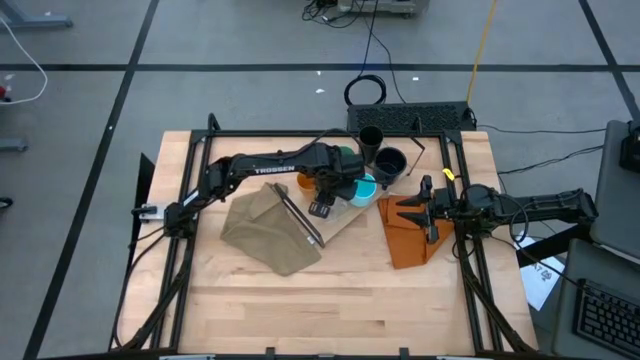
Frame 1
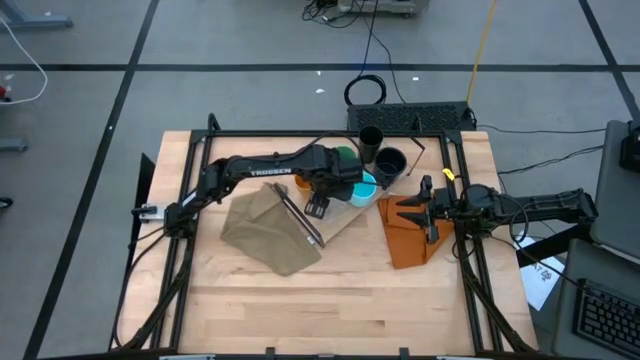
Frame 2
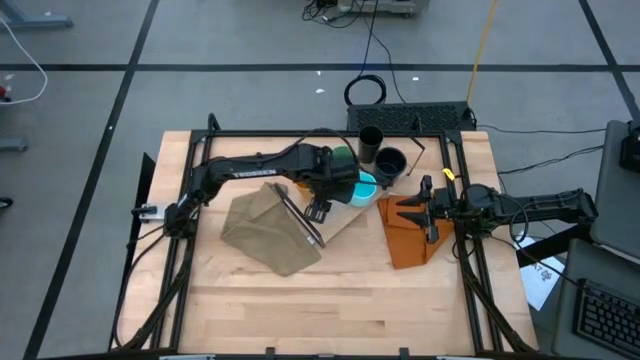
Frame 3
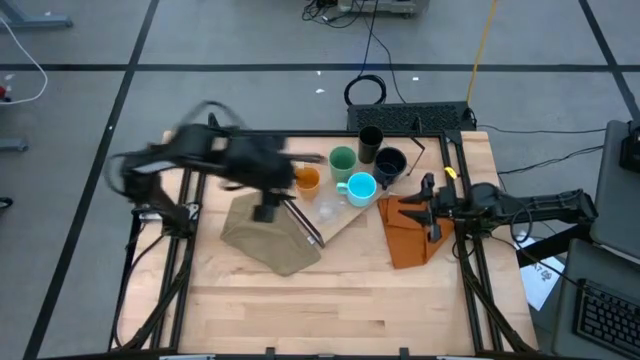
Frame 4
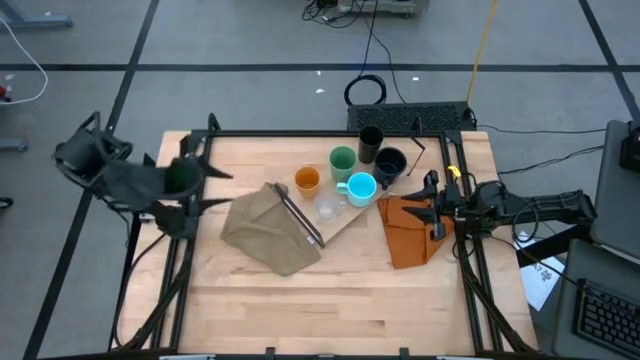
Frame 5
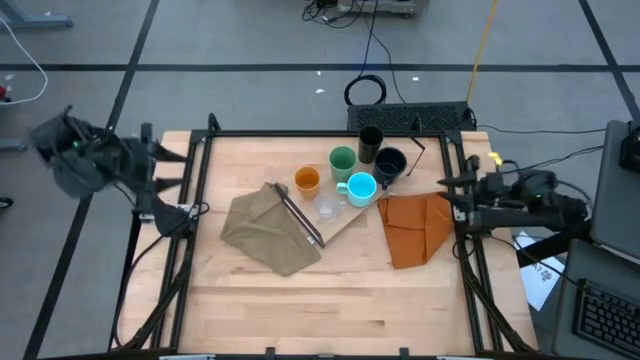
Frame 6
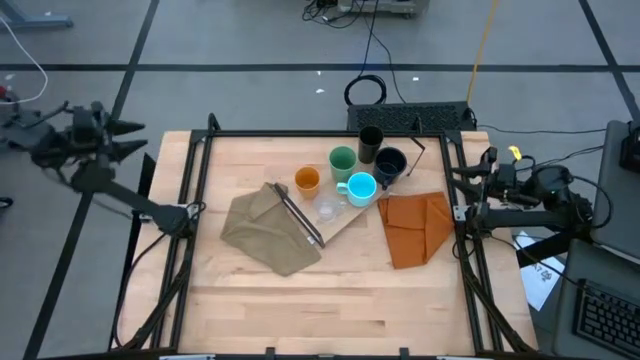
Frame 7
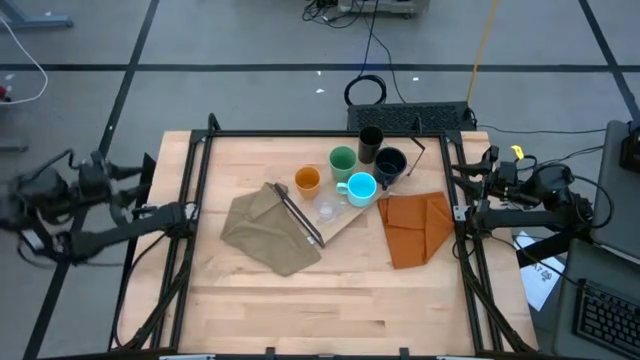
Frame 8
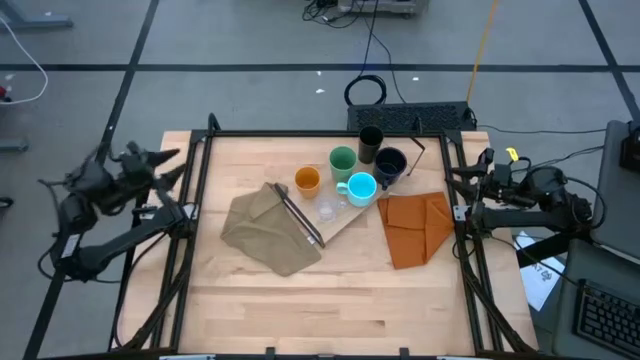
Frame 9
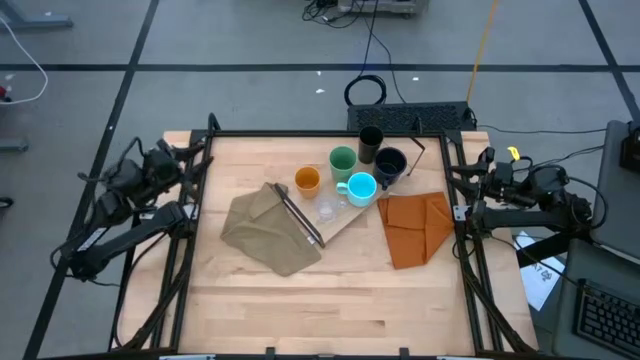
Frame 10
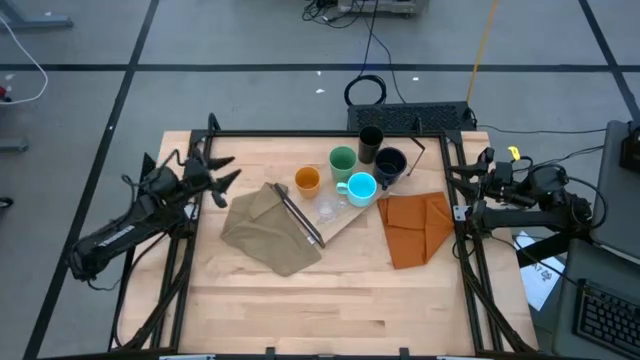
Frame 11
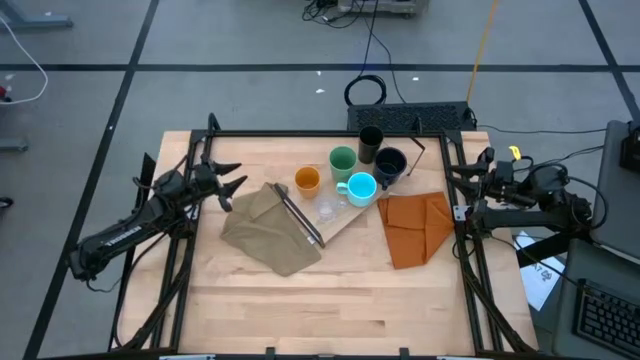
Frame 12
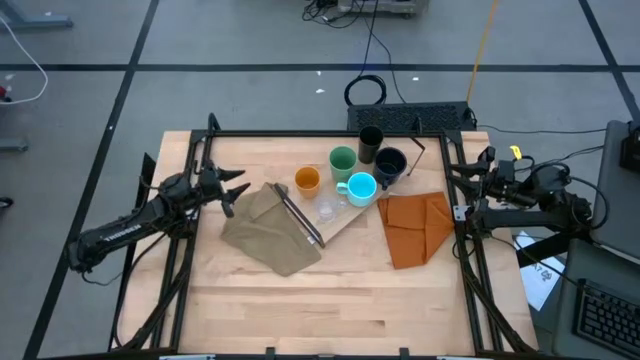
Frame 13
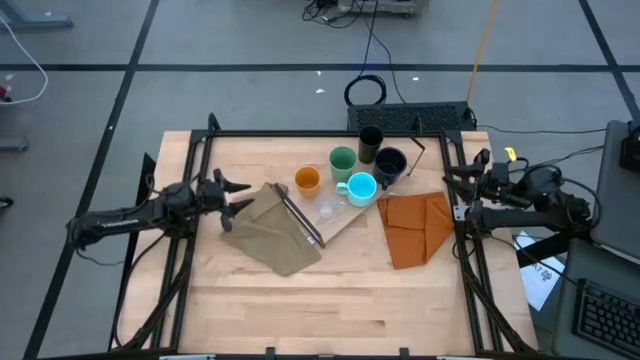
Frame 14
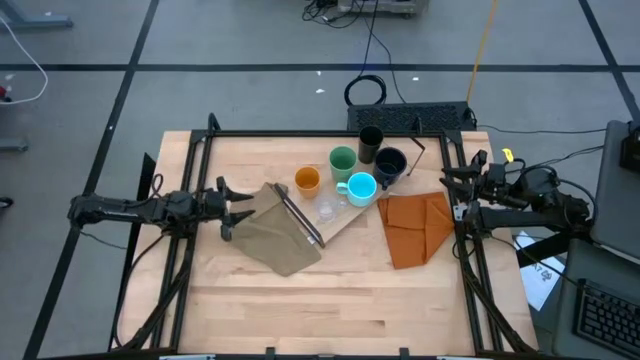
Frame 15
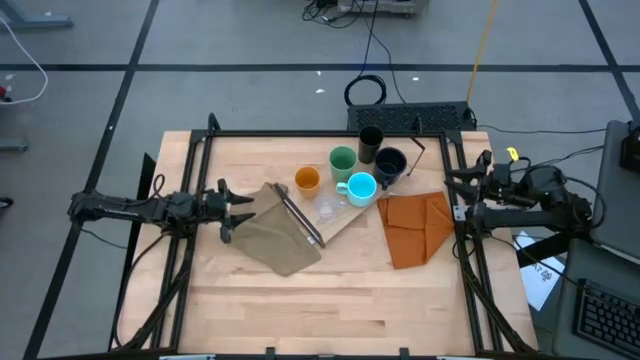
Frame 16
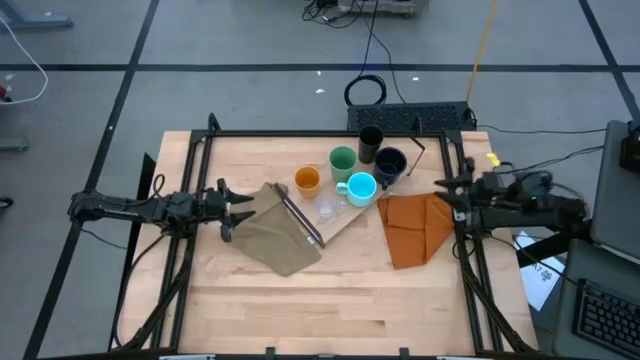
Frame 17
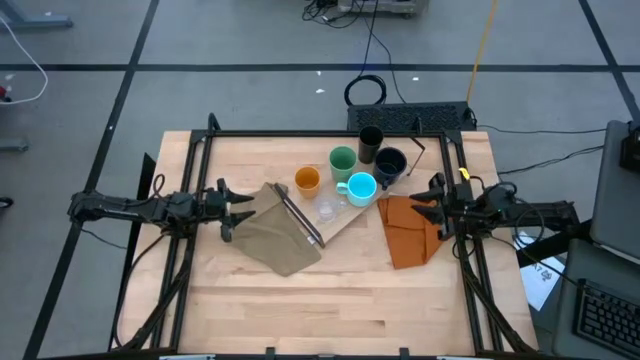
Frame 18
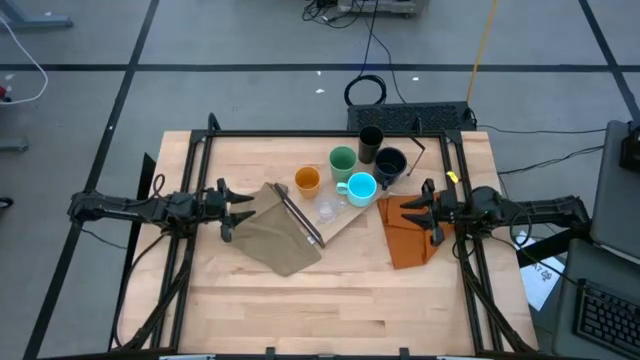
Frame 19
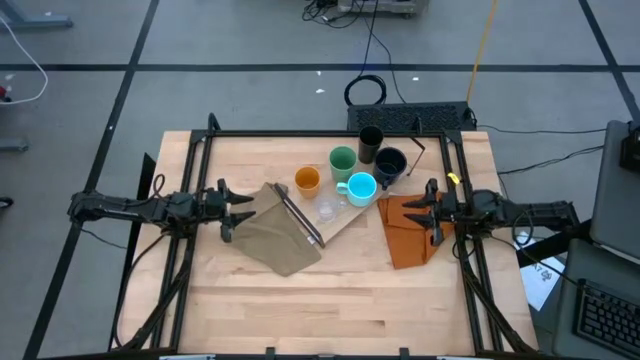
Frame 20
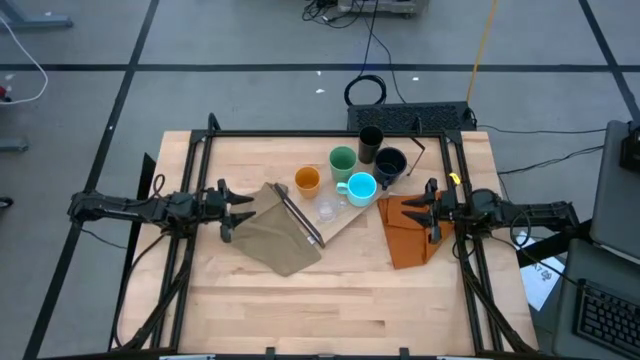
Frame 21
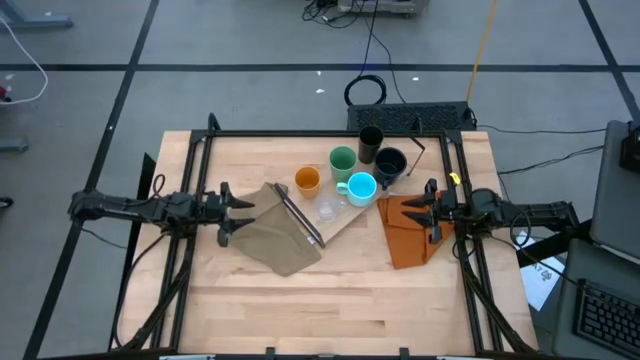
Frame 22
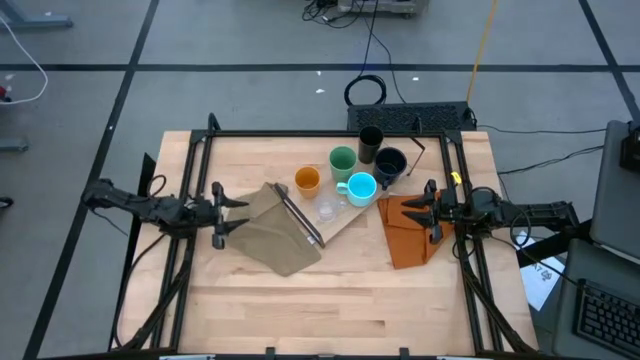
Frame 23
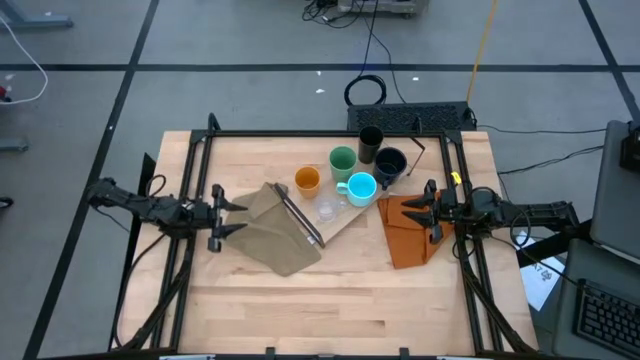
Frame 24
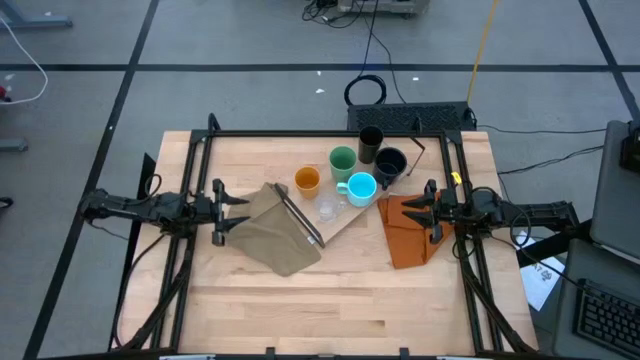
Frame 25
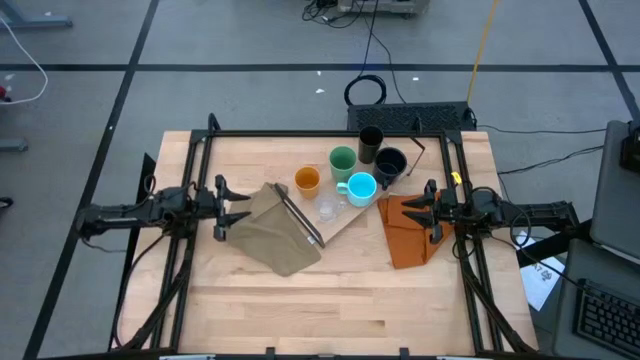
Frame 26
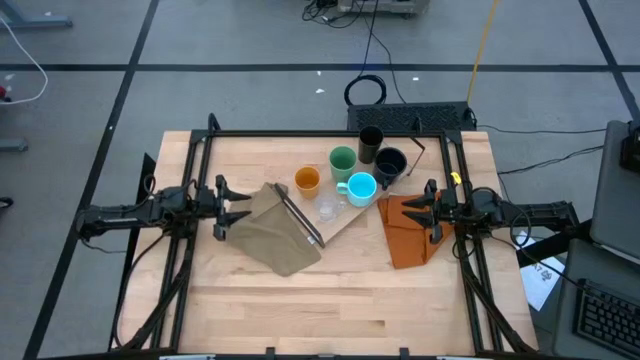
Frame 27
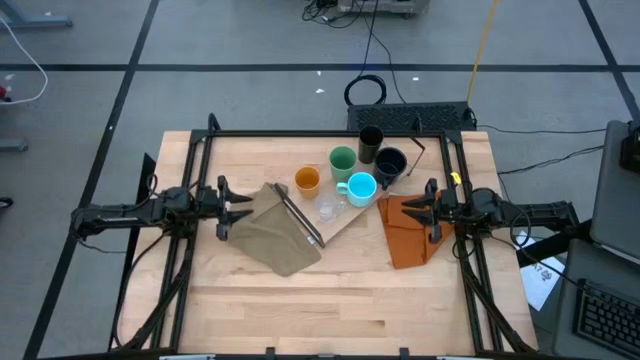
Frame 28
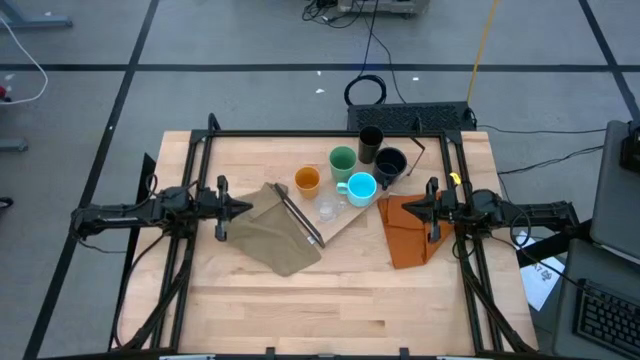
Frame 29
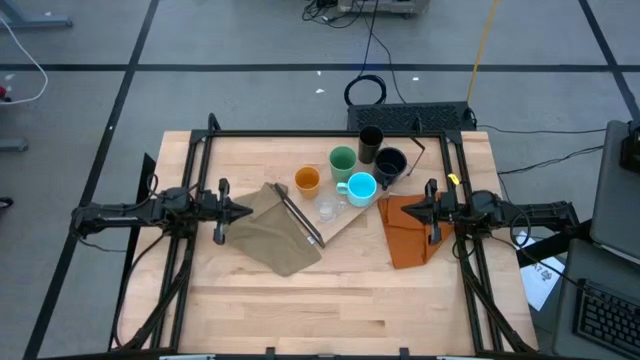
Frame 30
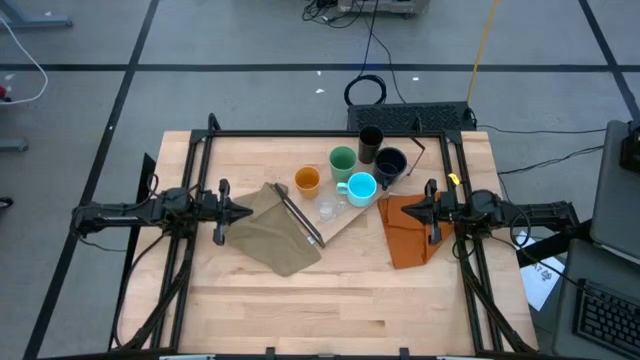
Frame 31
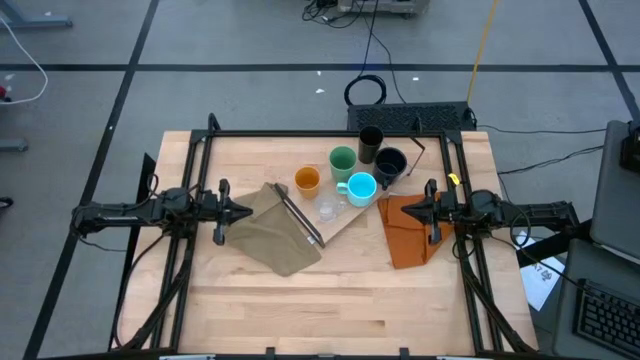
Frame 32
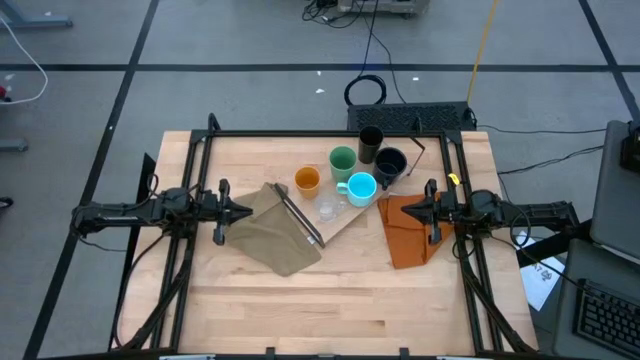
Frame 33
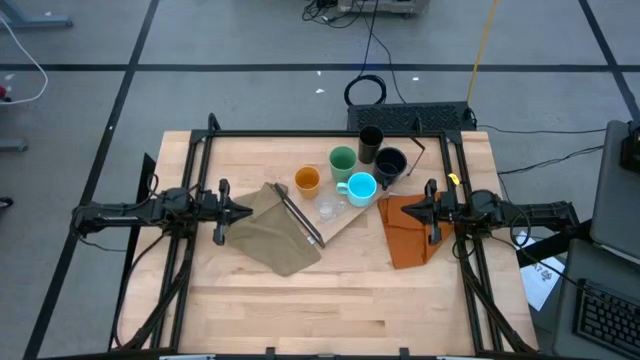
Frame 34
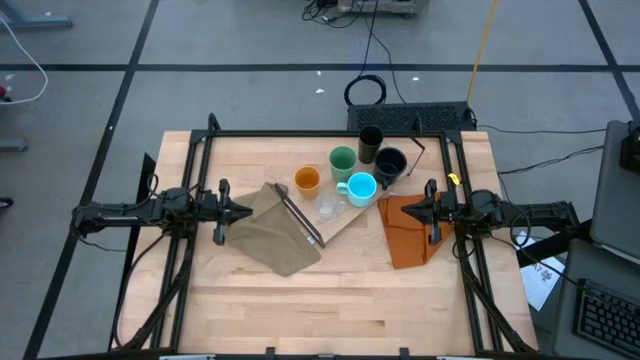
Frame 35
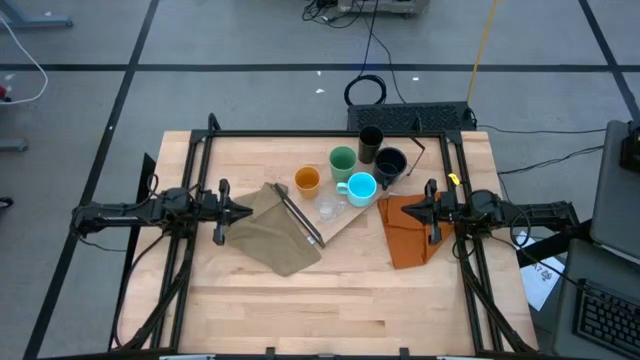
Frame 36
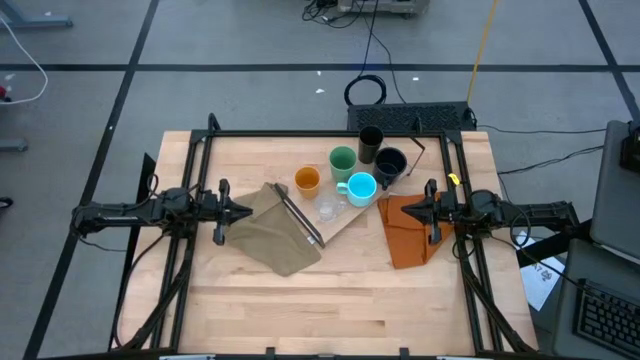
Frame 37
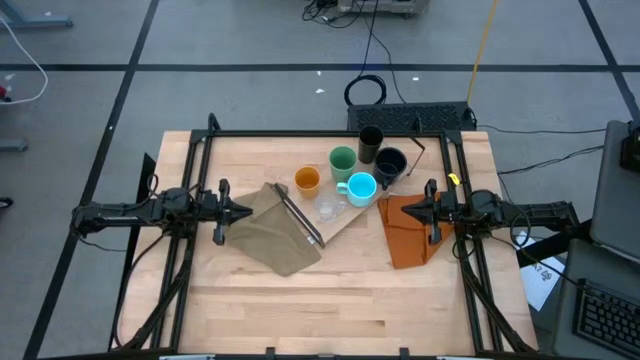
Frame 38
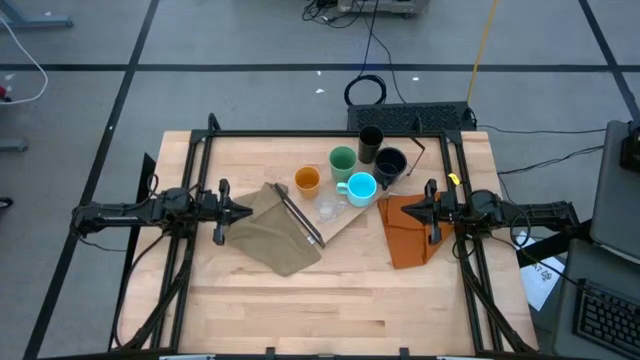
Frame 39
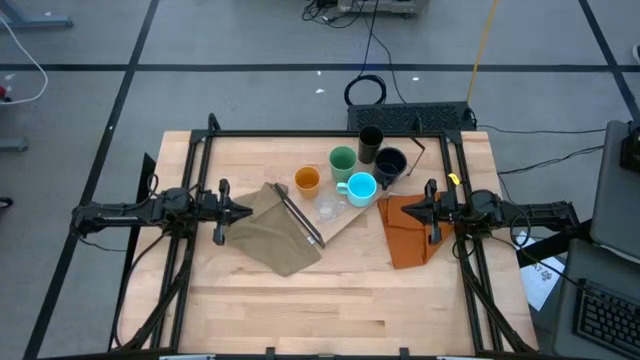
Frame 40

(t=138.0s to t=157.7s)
Task: Stack small to large cups/mugs on shelf
Return to Home Position

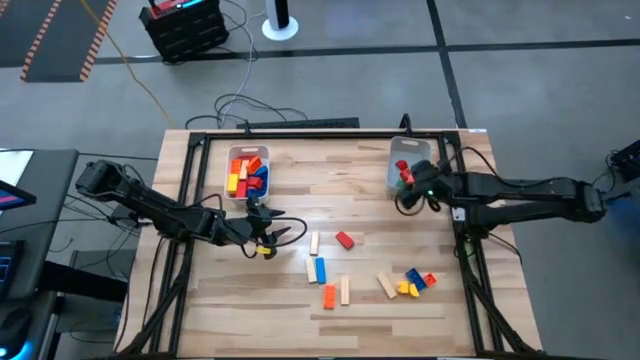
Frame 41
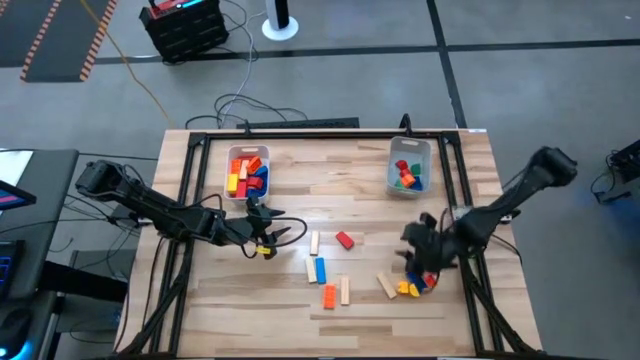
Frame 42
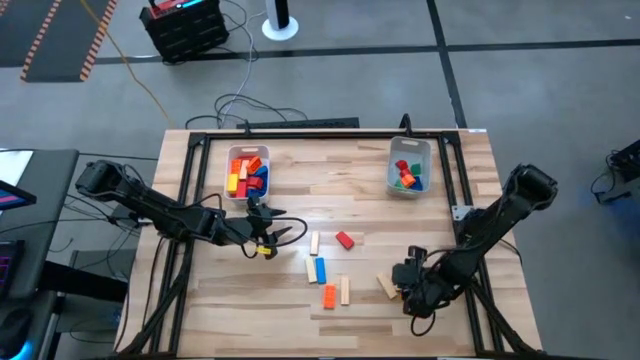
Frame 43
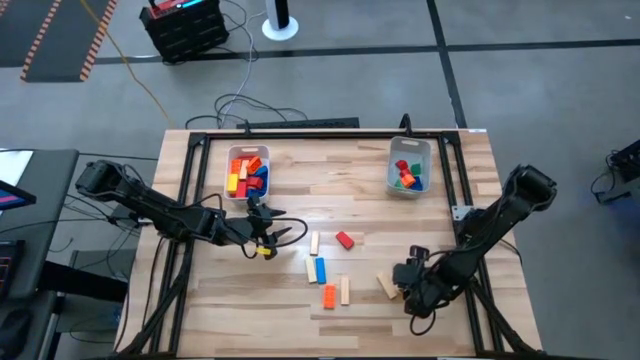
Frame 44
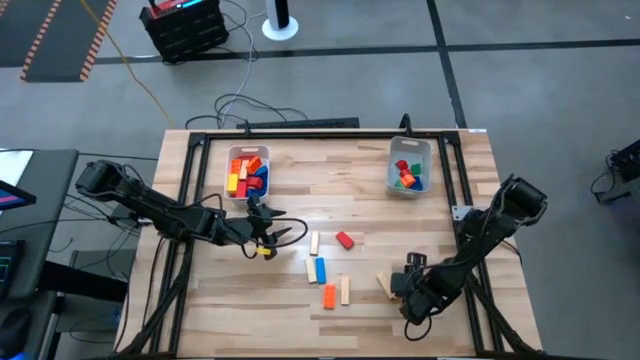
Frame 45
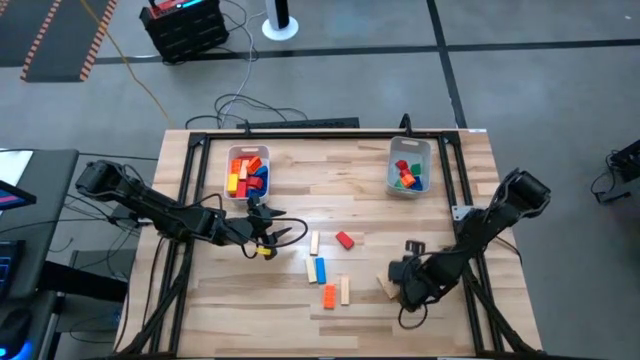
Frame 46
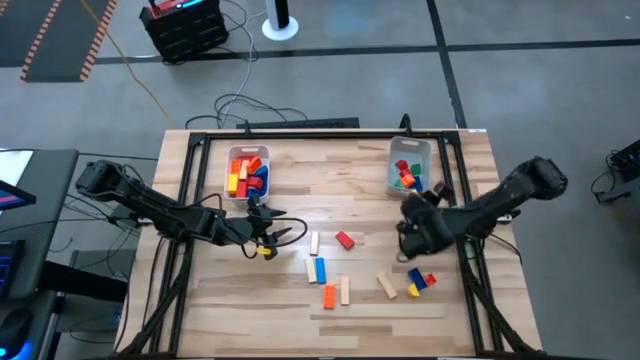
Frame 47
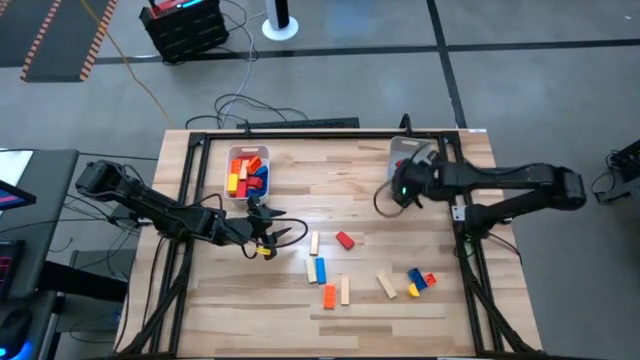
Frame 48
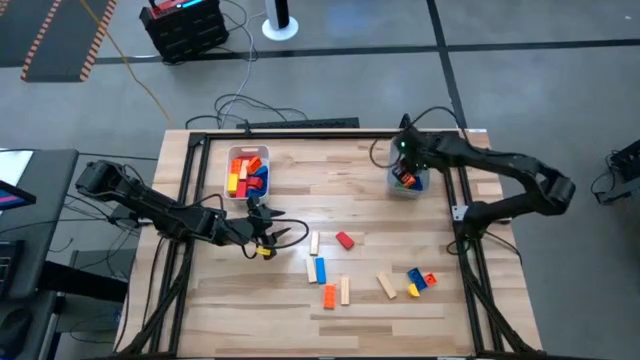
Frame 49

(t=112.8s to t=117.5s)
Task: Sort blocks by size
Put the small yellow game piece into the gray bin
